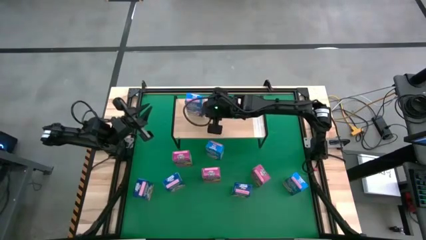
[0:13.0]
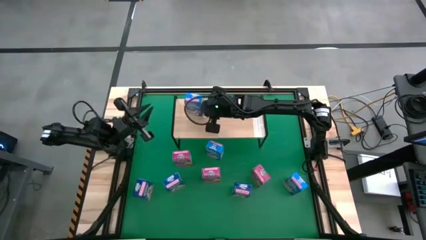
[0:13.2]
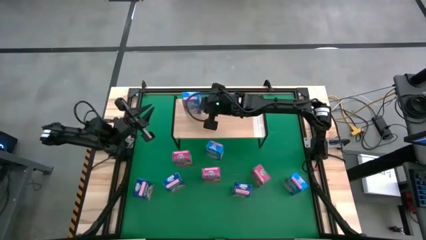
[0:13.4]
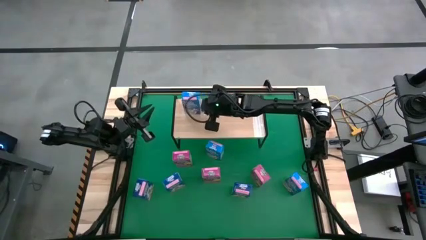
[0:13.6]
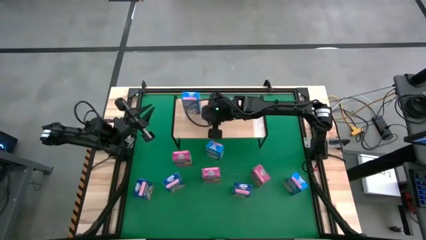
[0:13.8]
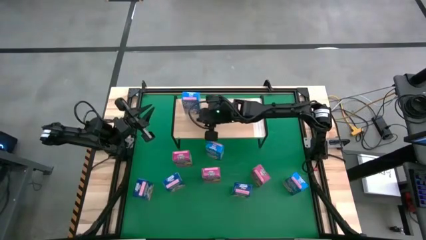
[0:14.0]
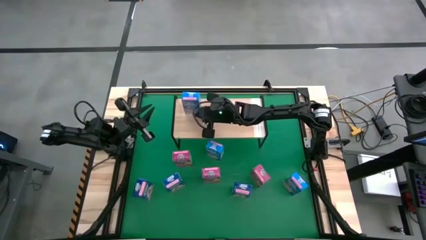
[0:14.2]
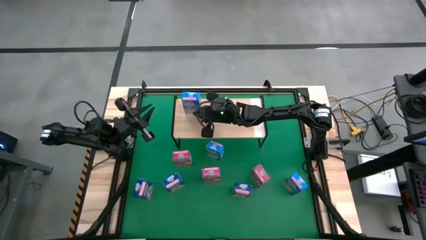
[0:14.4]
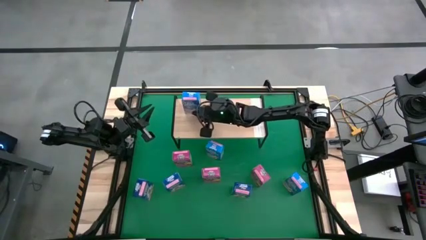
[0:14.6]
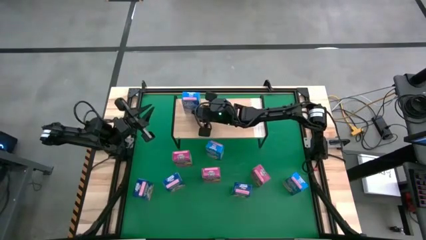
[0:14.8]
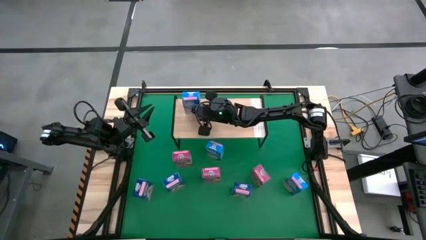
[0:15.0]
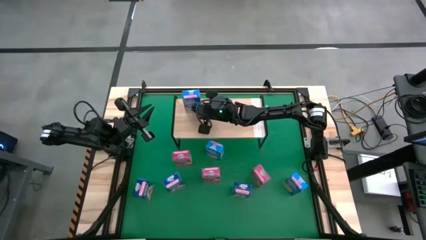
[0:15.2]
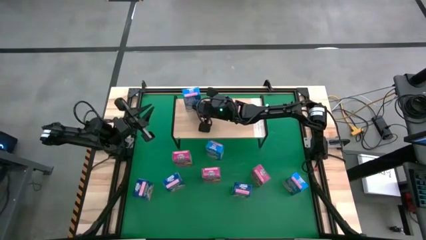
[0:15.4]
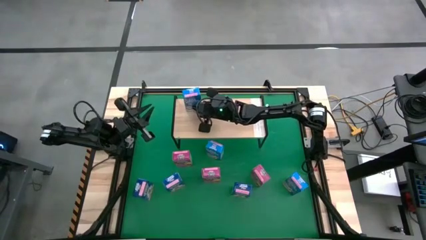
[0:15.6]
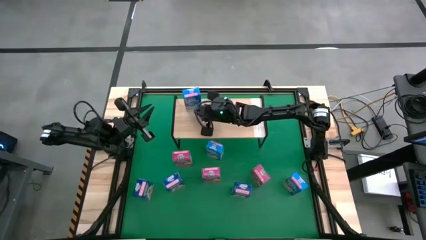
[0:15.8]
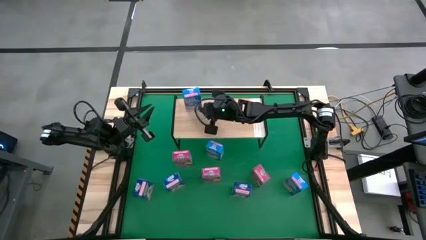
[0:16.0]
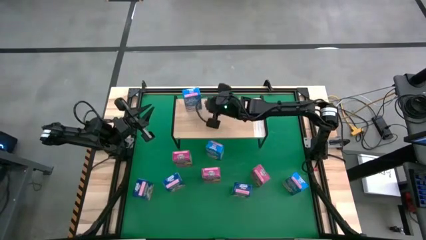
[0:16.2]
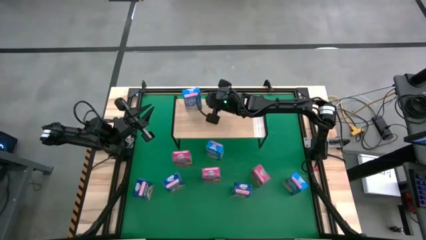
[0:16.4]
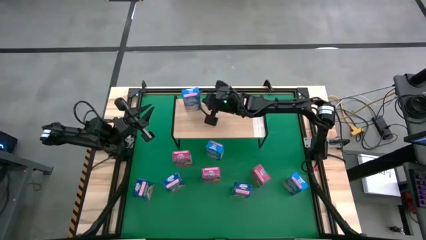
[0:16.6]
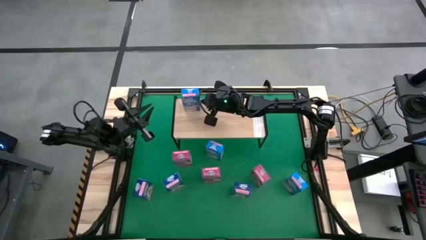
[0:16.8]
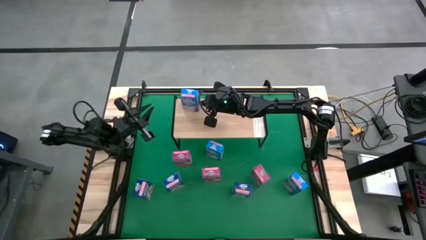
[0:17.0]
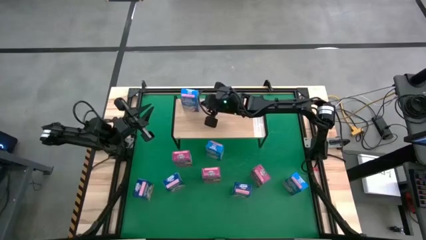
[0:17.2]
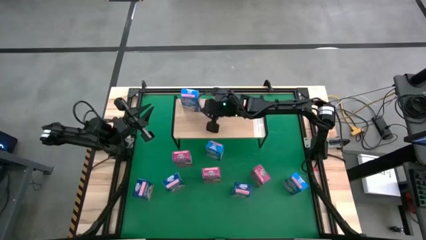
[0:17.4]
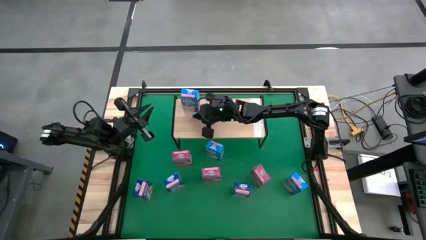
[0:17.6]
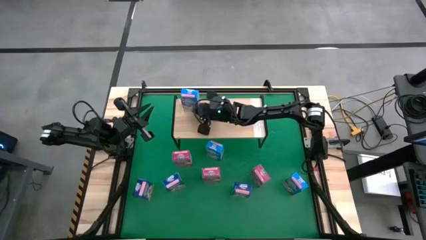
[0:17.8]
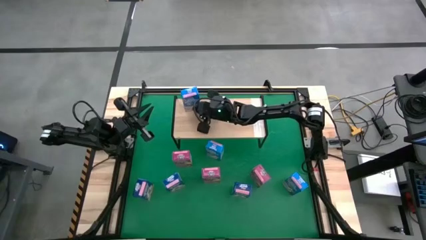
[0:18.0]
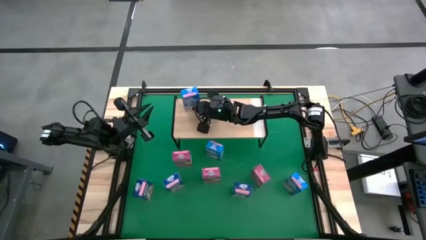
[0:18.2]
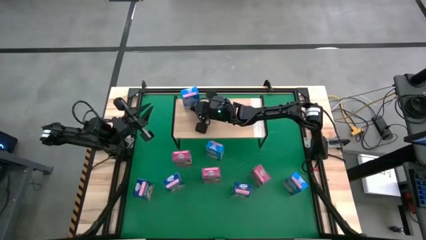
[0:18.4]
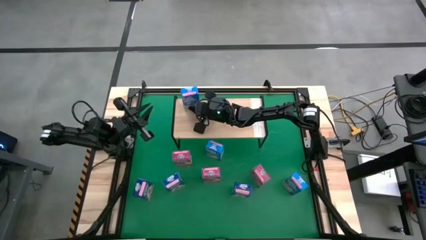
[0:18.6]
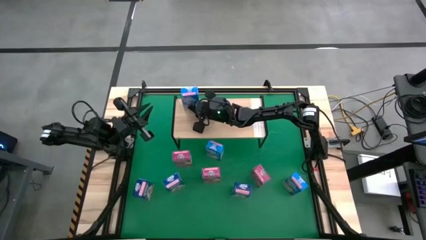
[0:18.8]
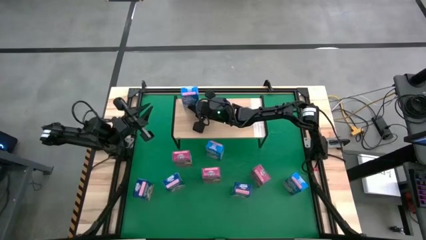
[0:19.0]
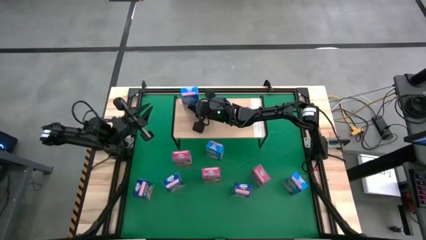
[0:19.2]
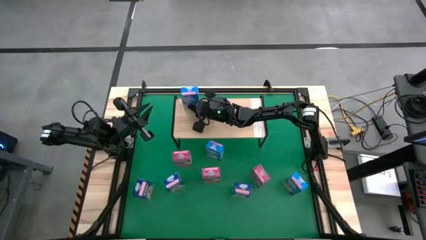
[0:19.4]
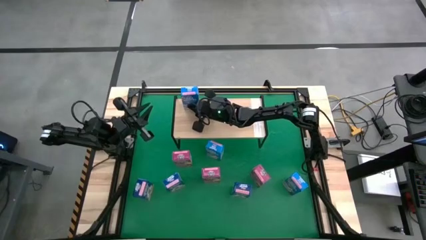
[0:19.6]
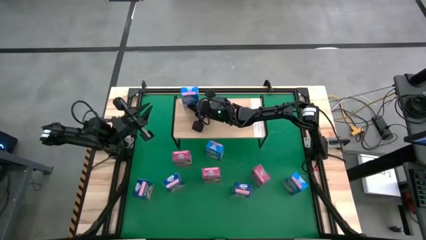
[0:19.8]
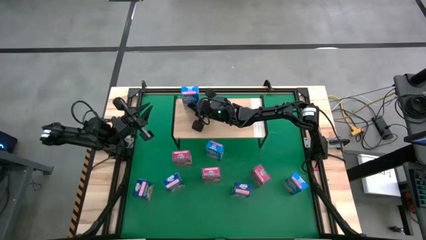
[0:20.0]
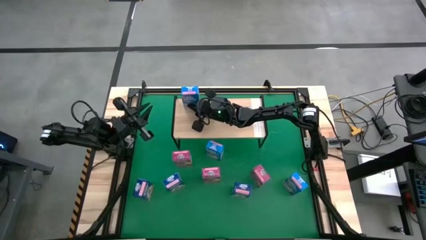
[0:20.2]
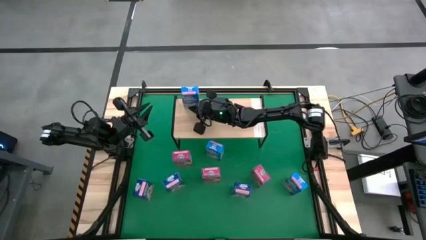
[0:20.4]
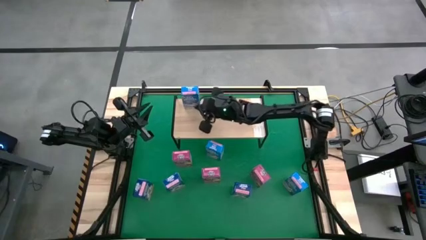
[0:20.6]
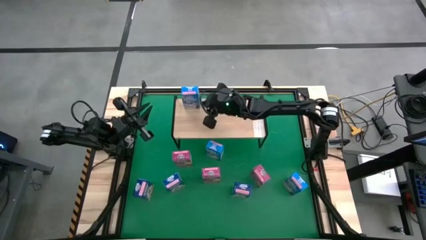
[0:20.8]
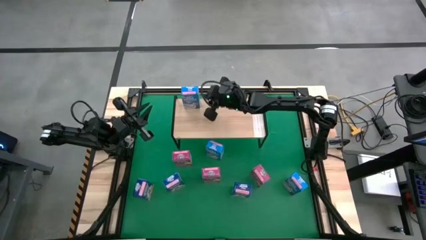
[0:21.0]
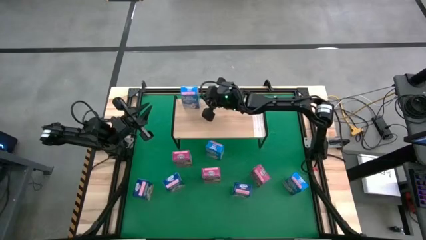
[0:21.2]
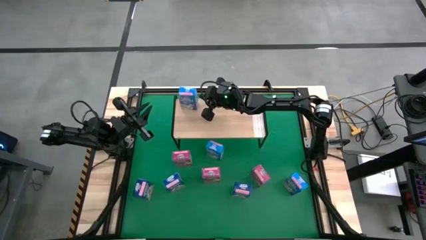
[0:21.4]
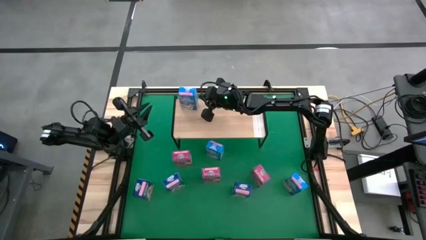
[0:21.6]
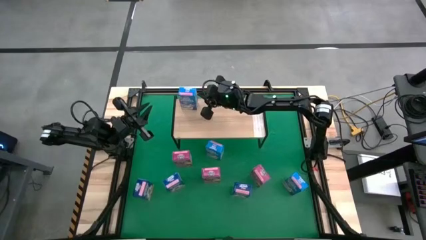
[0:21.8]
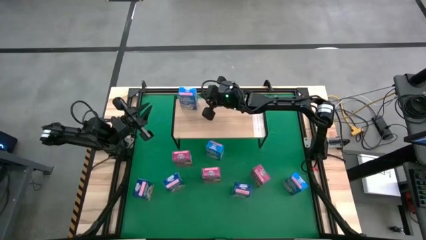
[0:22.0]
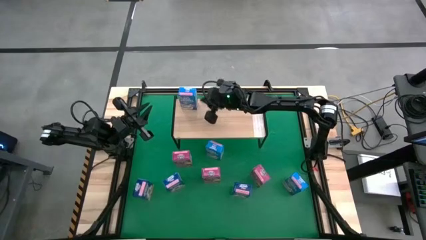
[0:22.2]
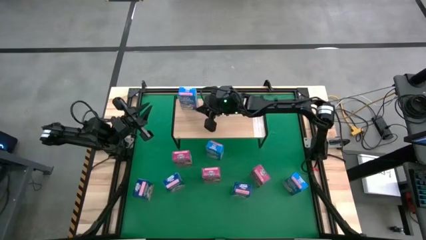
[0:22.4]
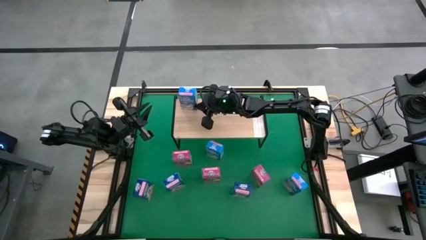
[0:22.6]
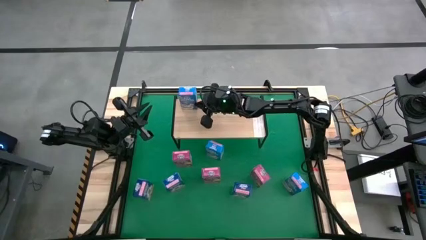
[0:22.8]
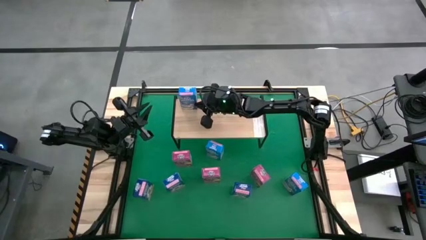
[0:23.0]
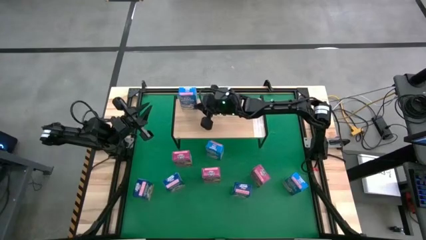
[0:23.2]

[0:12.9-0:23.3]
Task: Stack cereal on shelf
Put the center light blue cereal box on the shelf
